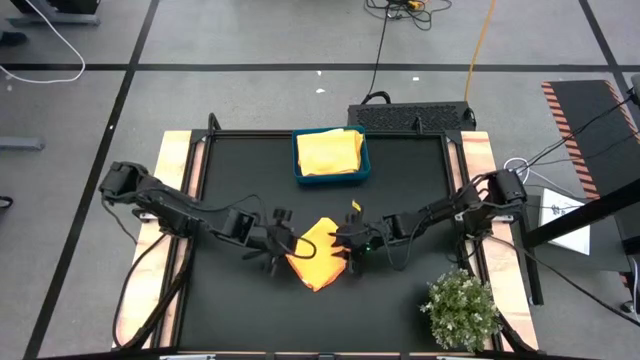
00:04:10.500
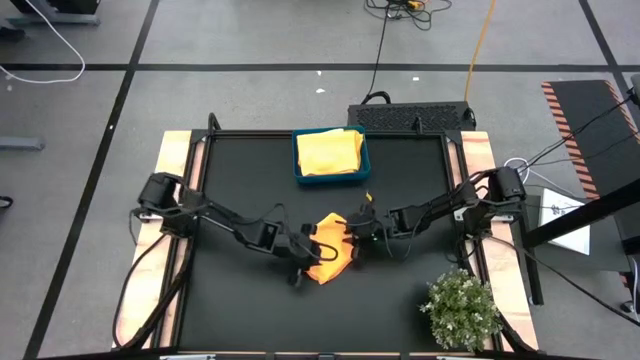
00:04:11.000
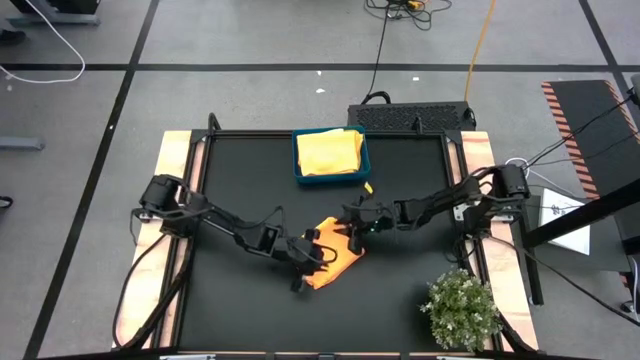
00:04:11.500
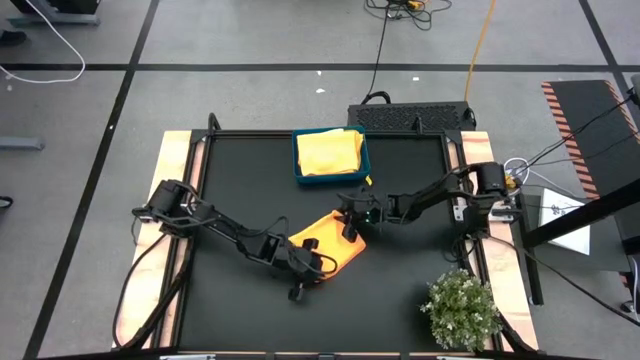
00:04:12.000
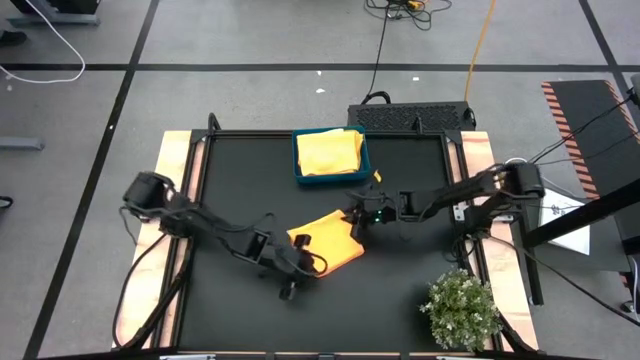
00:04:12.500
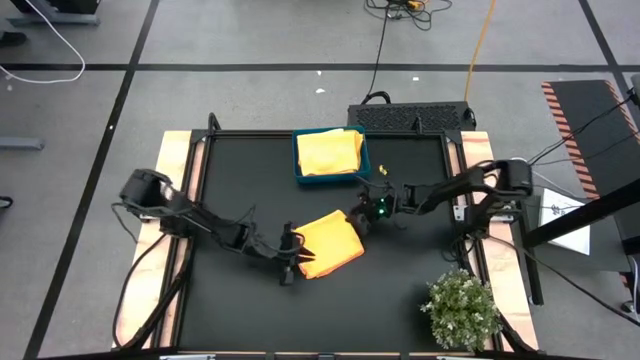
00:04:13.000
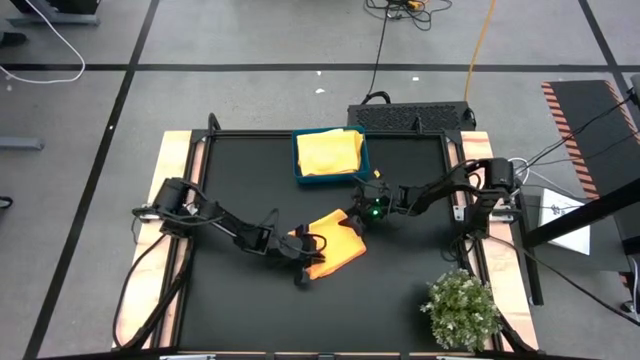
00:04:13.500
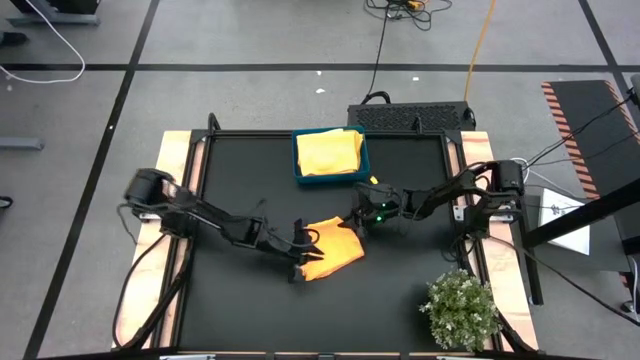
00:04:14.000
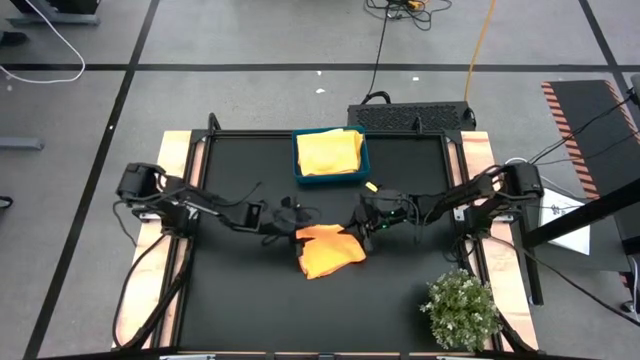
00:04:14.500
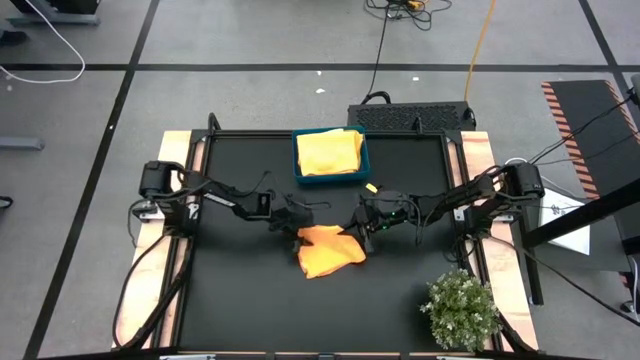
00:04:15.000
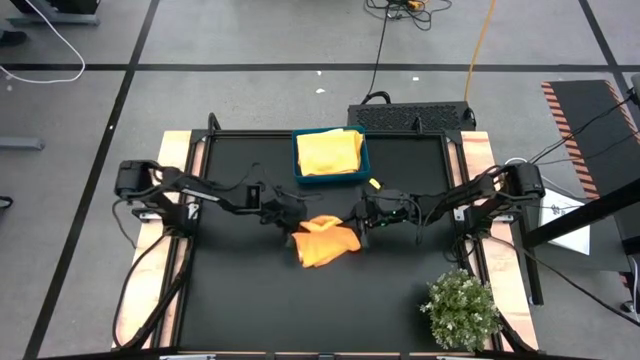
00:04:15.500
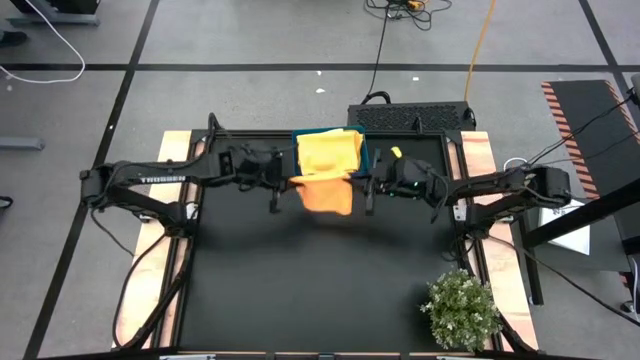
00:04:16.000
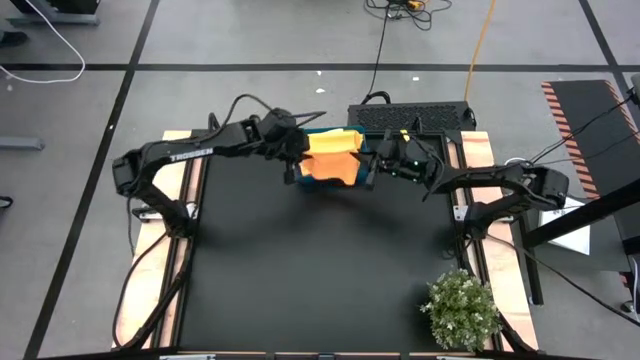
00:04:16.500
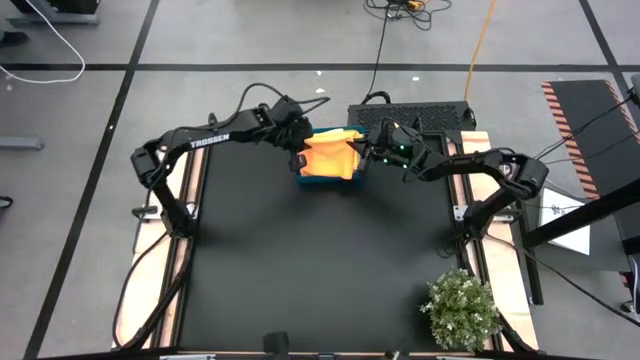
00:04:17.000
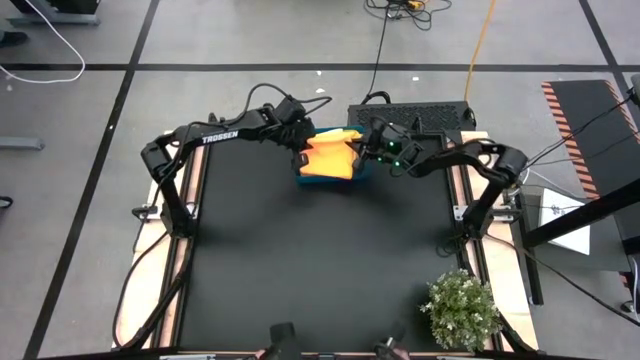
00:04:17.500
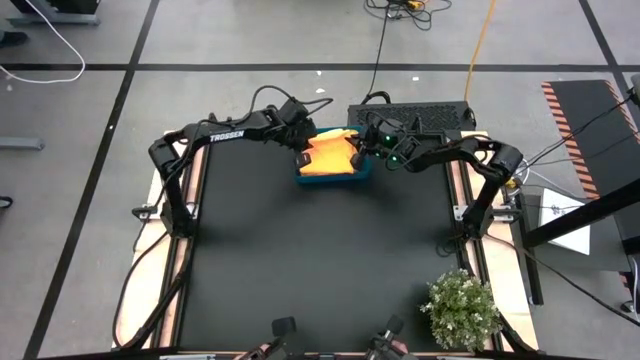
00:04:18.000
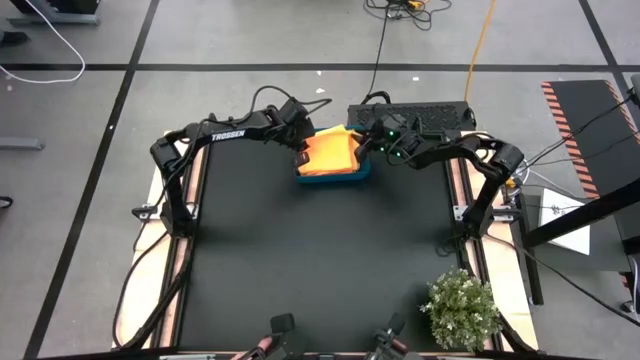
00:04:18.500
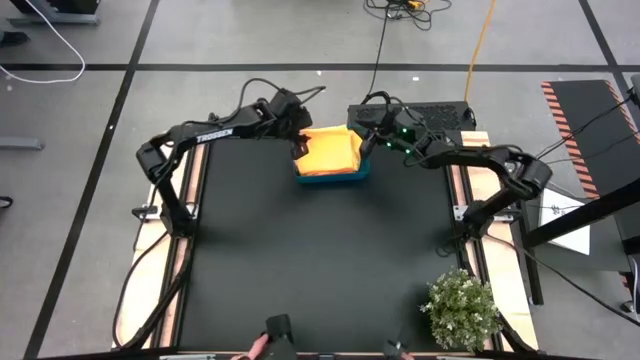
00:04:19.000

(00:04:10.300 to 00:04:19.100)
Task: Fold microfiber towels
Put the folded orange microfiber towel into the blue bin

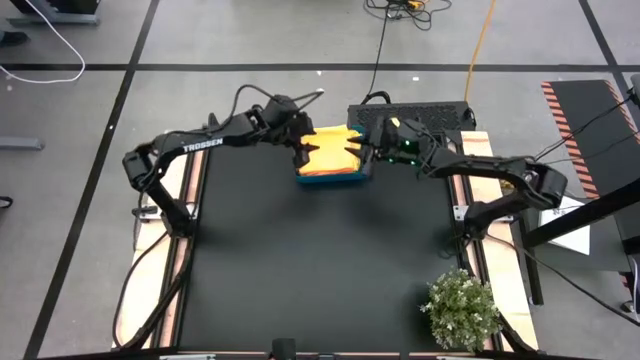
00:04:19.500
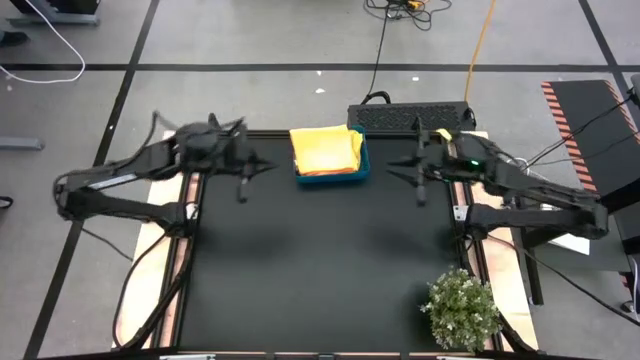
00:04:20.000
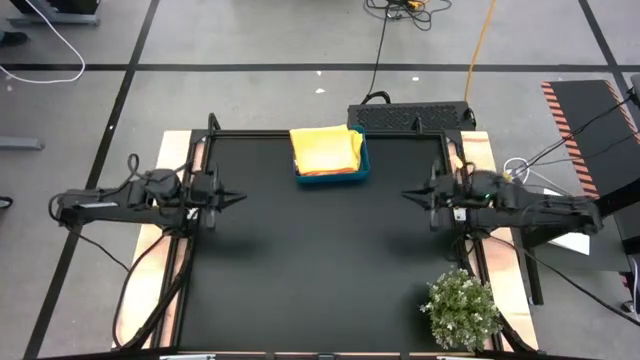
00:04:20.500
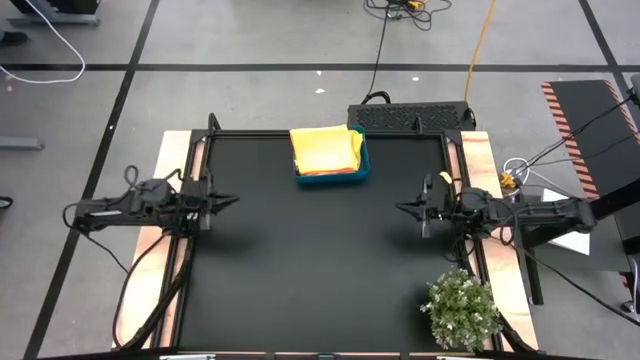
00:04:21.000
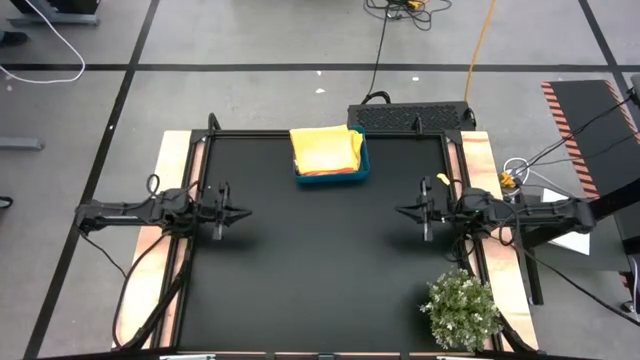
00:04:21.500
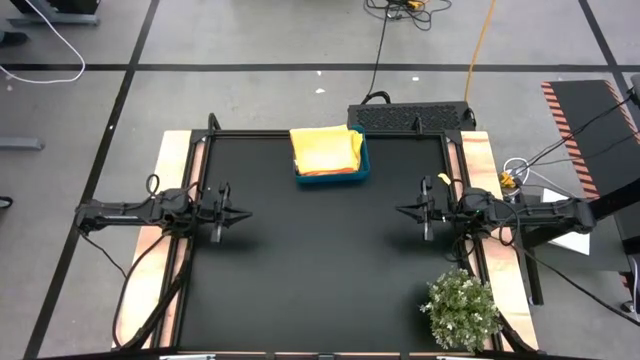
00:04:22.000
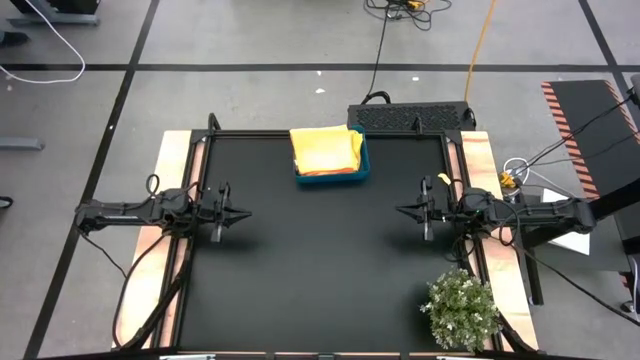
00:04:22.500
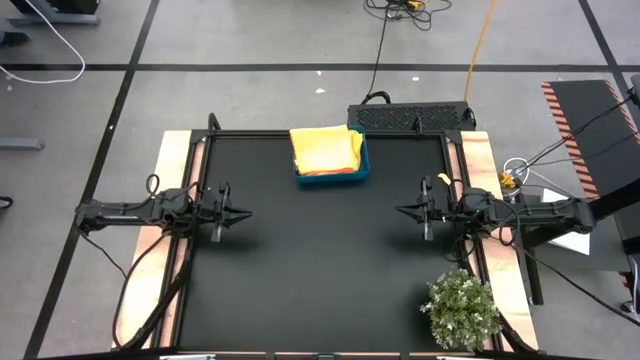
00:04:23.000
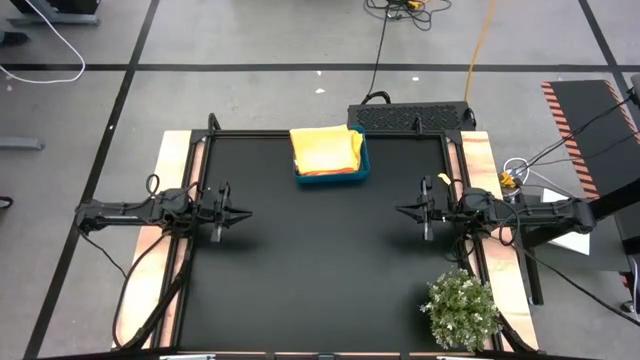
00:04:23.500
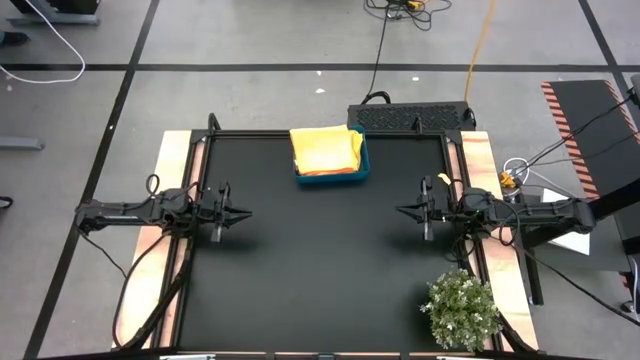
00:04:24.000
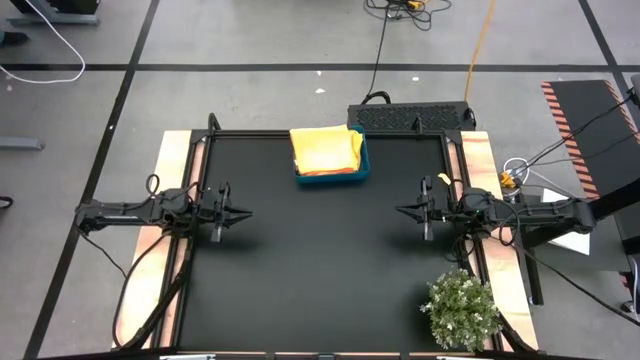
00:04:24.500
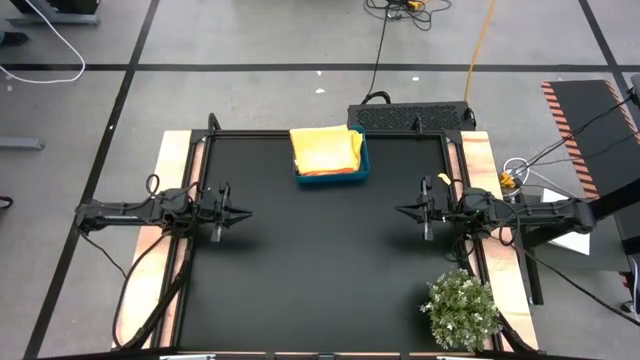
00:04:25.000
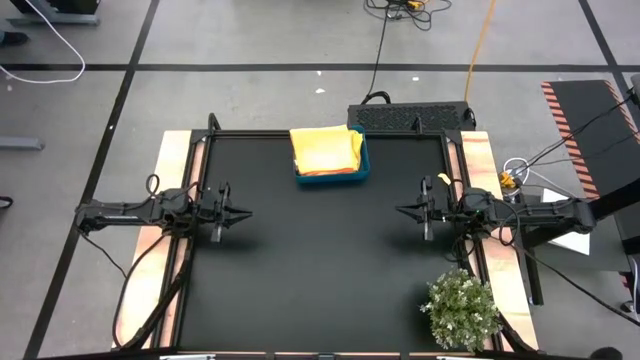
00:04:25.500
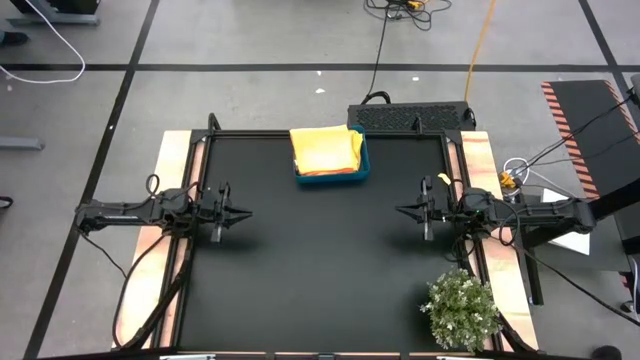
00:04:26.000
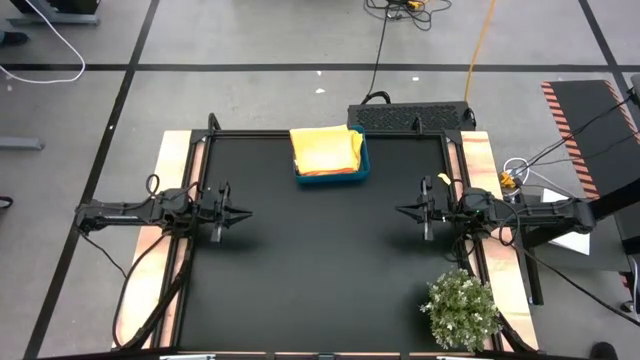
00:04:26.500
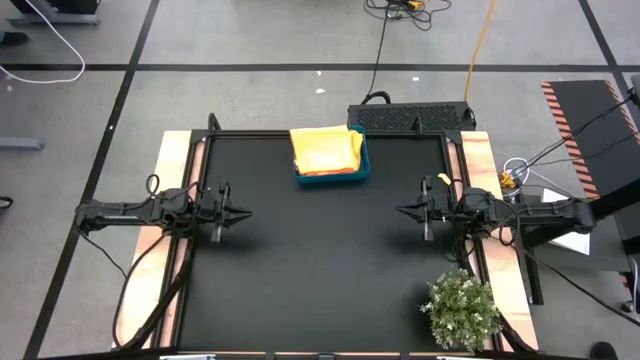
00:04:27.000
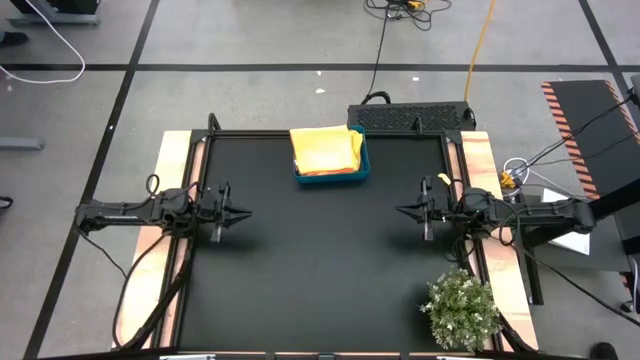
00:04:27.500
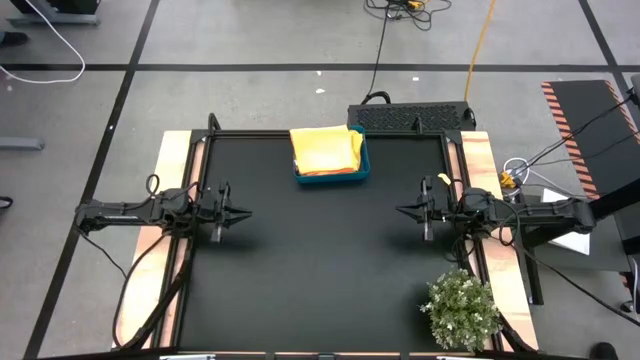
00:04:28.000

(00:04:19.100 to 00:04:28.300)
Return to Home Position

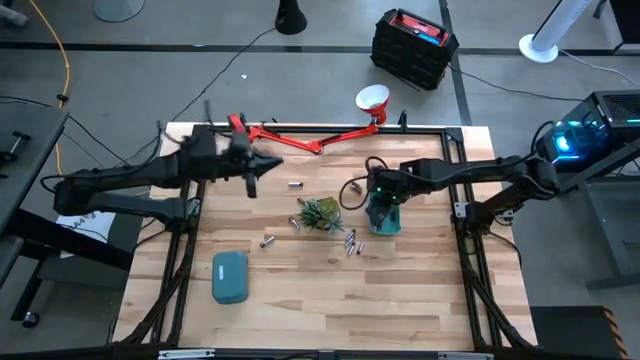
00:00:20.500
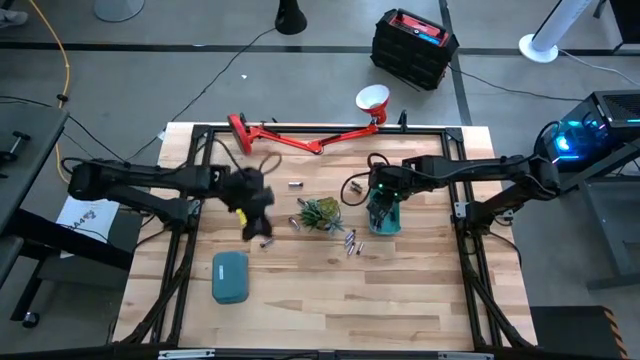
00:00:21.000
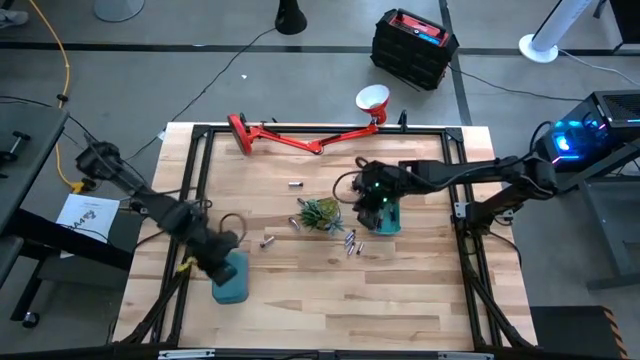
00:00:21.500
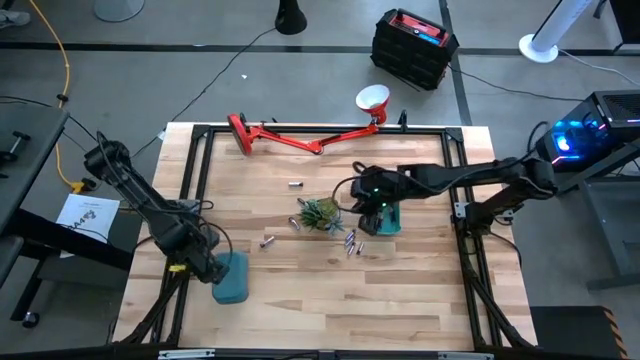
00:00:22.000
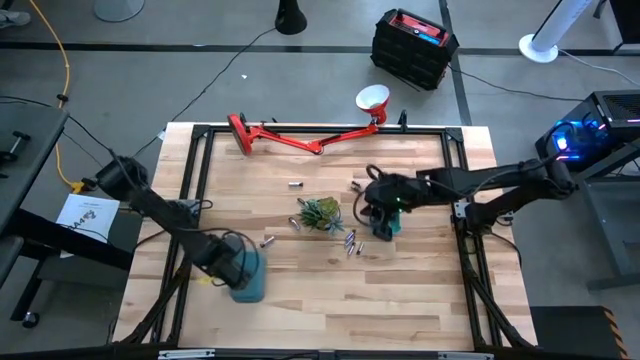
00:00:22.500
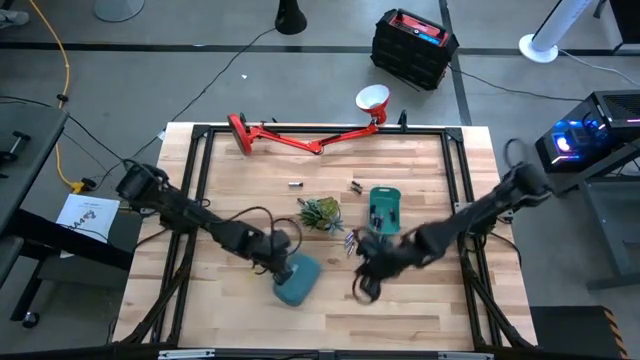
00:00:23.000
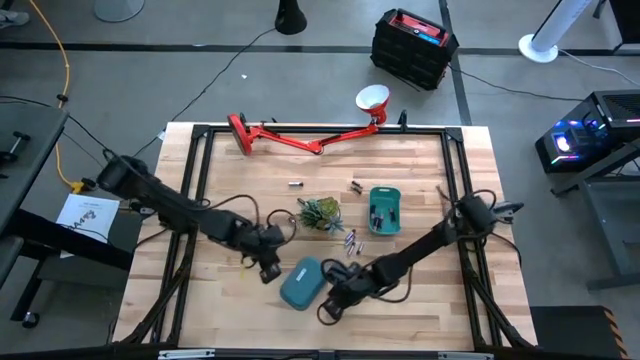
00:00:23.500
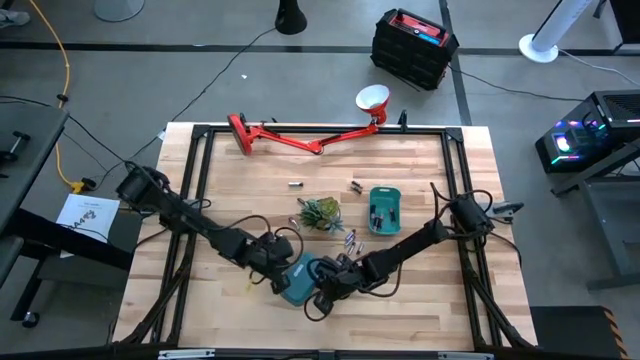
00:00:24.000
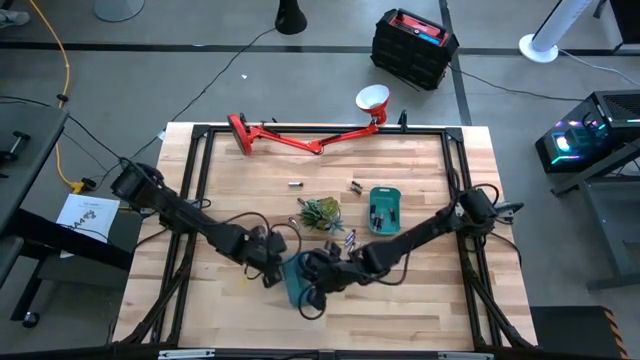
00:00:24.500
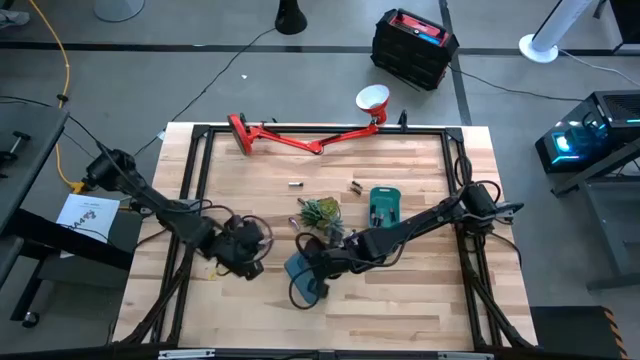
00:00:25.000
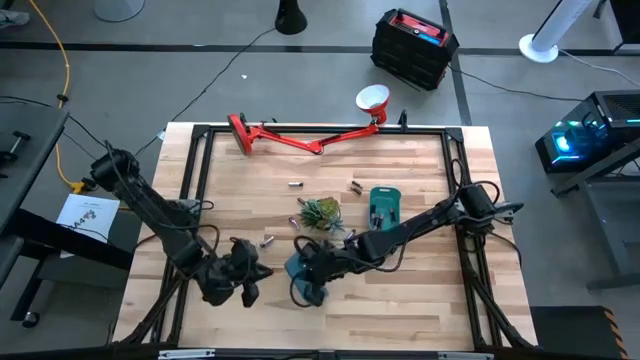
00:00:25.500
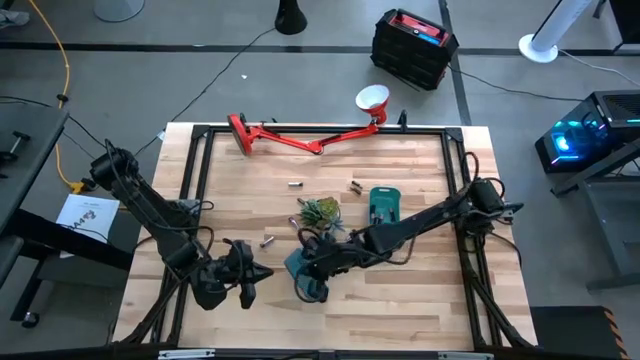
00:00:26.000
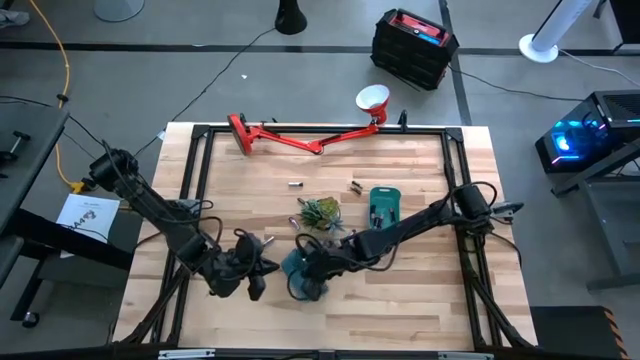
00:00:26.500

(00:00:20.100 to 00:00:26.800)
Task: Sort batteries
Prepare the blue bin
